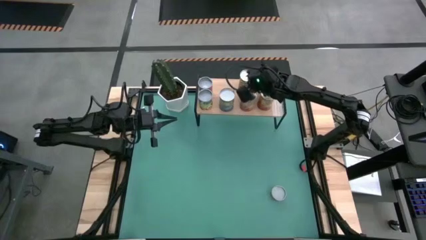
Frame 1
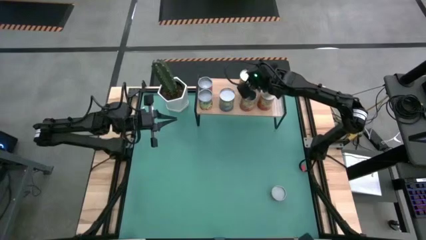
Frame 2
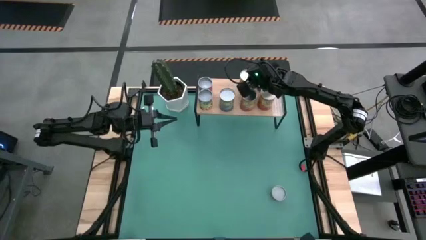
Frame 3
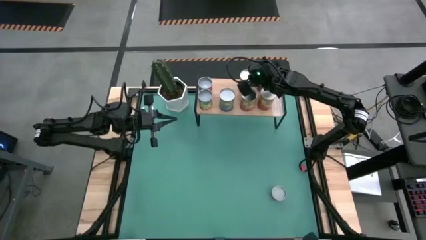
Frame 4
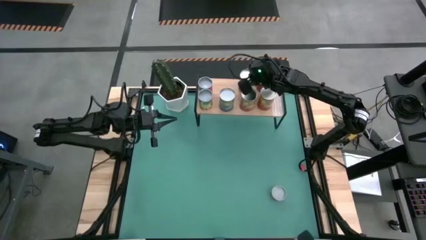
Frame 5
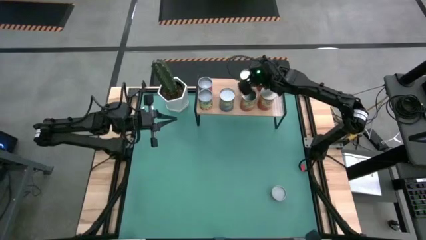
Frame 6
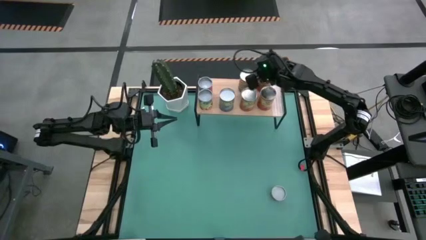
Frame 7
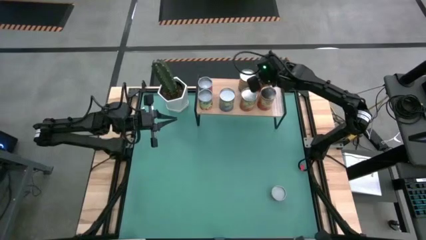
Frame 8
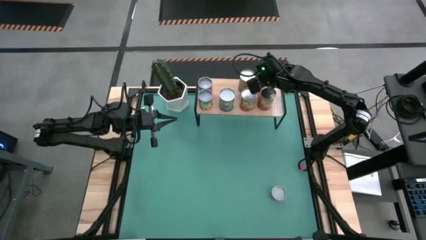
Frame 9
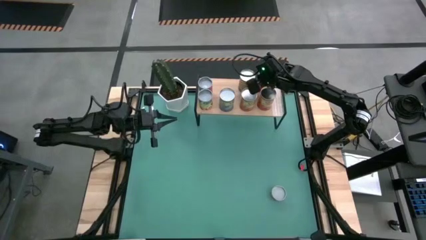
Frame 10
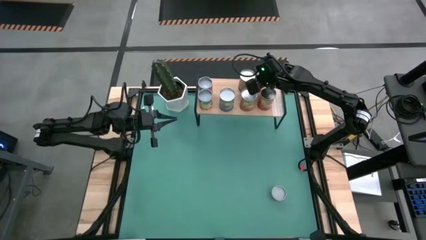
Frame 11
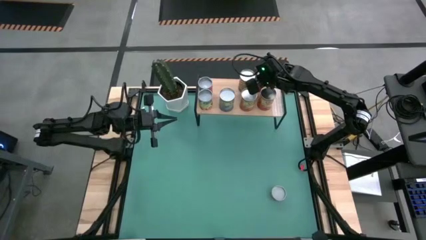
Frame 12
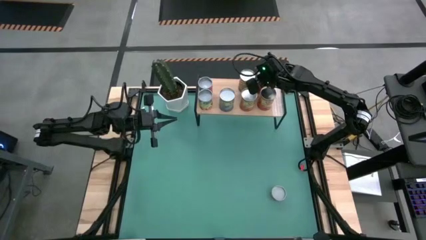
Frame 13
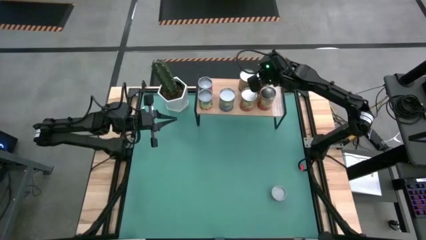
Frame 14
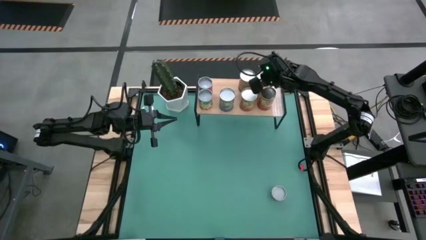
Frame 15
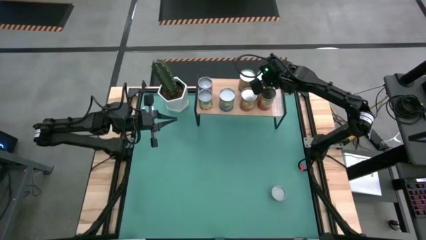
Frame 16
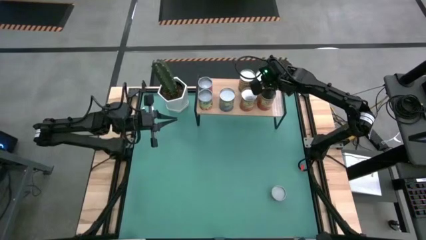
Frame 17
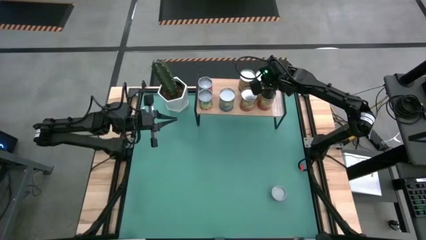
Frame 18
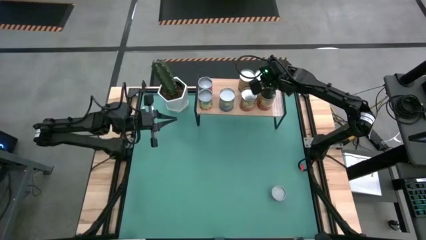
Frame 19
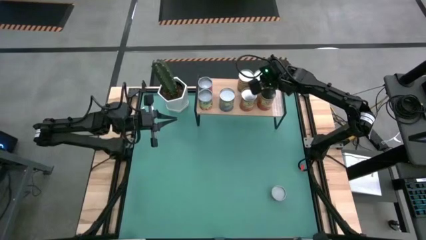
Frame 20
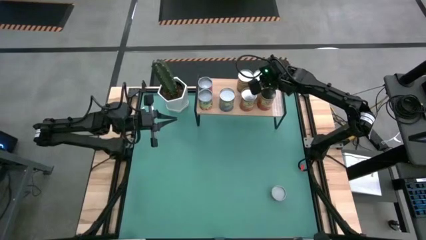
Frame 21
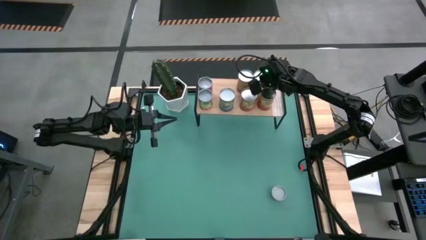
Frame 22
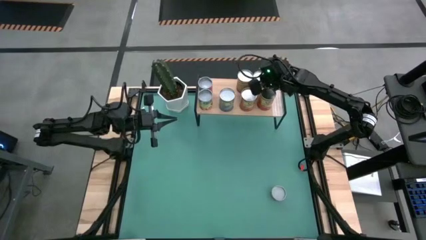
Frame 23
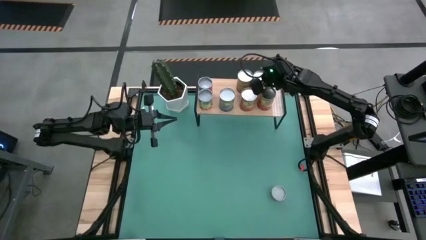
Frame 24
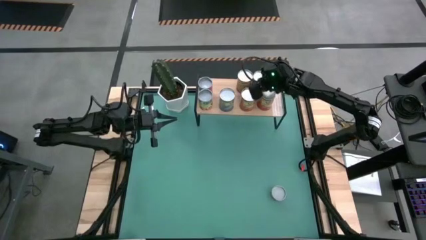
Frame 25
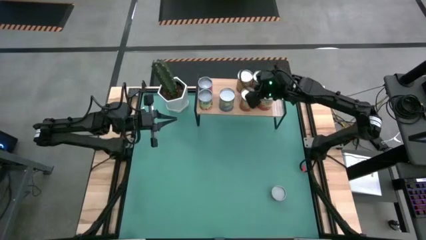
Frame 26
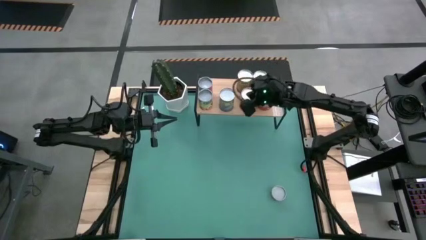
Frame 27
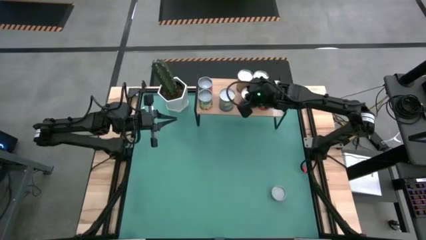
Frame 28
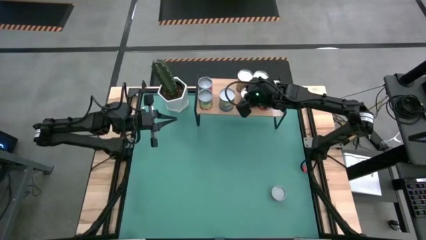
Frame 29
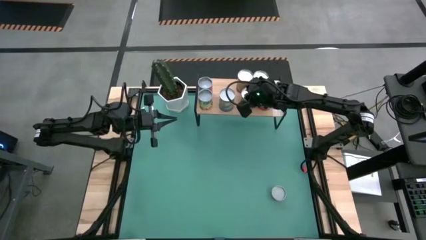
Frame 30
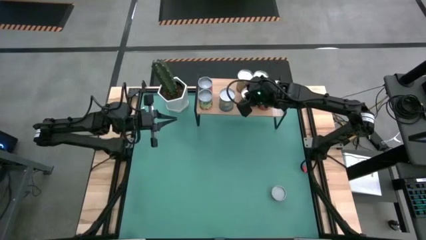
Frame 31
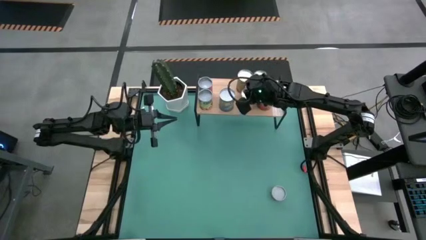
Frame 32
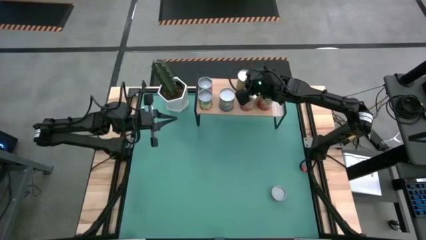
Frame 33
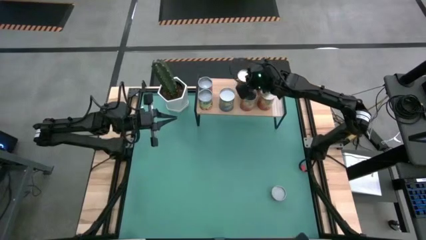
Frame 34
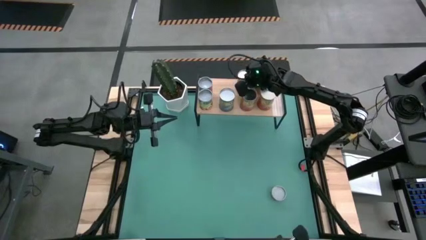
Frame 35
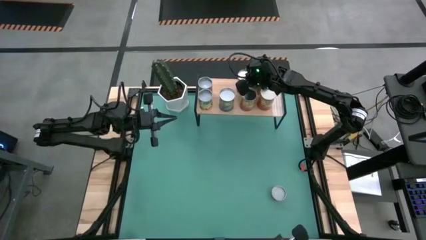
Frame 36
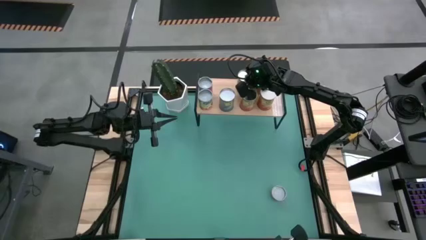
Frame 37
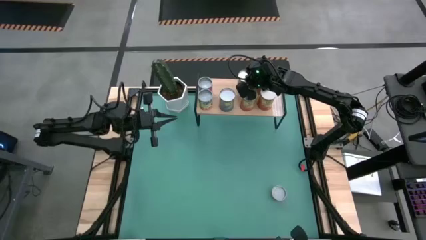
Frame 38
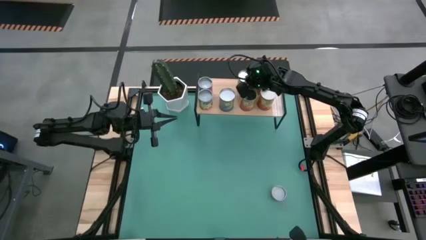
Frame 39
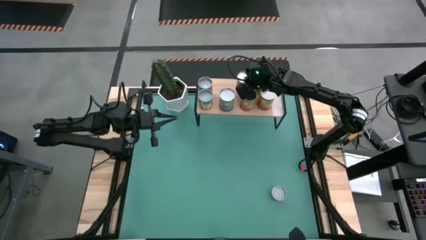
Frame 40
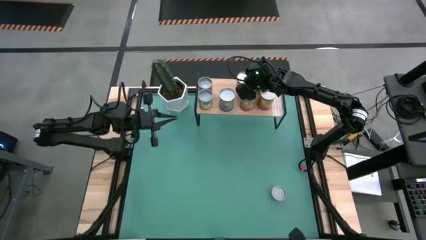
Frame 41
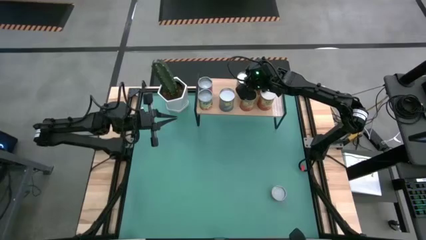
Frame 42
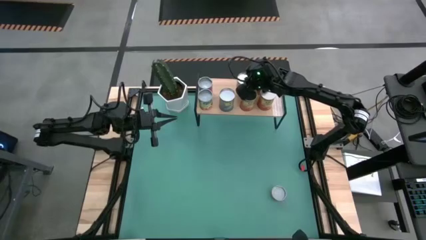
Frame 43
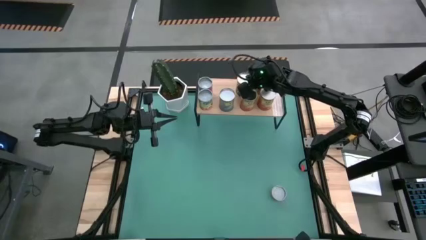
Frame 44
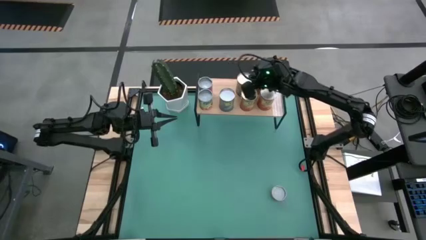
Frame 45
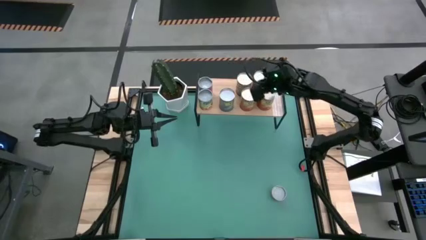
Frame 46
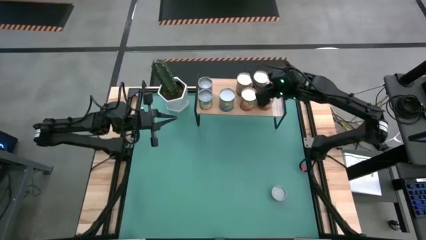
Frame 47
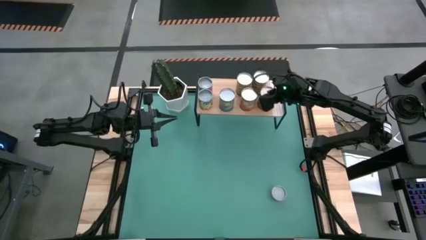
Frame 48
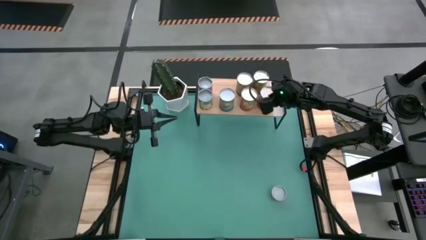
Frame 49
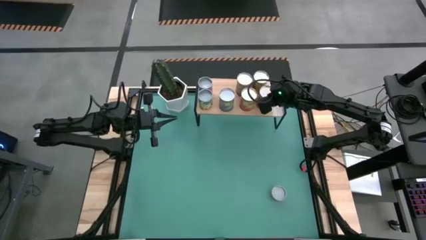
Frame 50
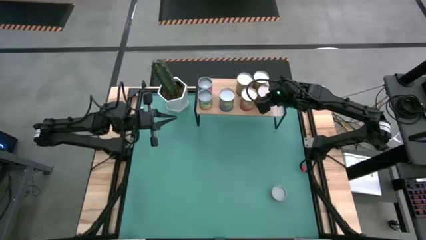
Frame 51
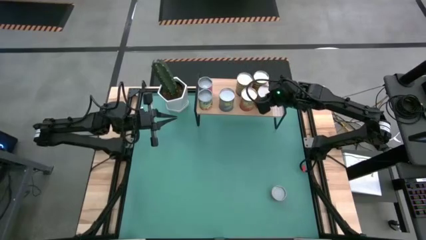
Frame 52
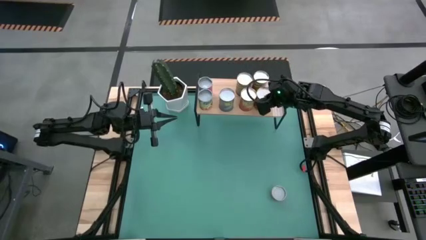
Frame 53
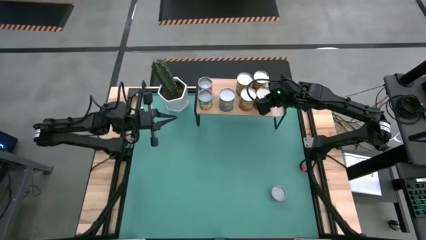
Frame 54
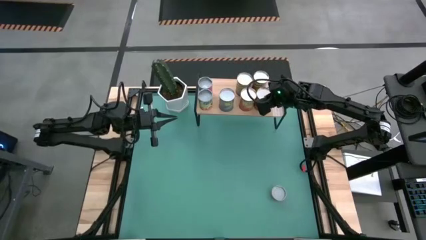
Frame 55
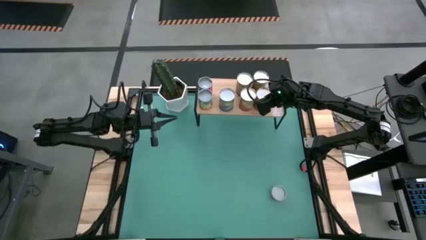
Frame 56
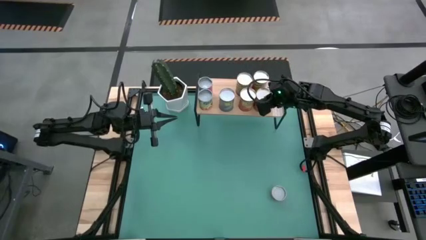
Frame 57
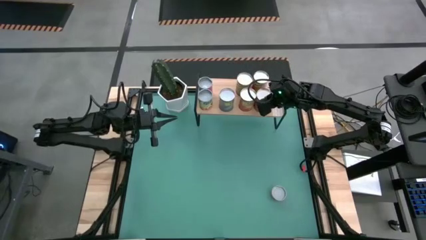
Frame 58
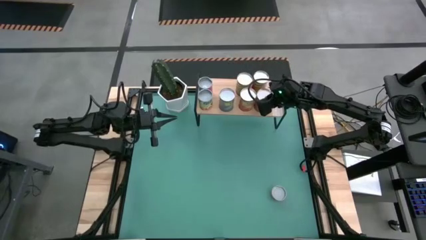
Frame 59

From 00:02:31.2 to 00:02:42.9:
Task: Pick and place cans onto a shelf
Adjust the cans on the shelf

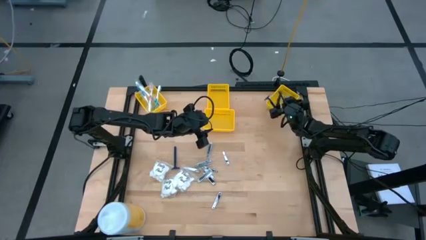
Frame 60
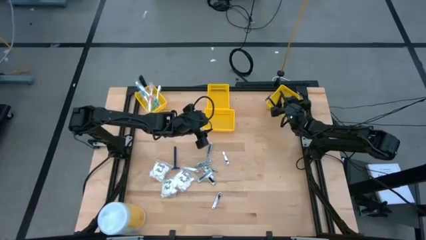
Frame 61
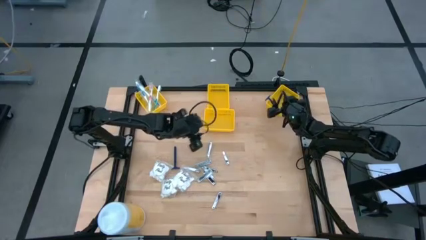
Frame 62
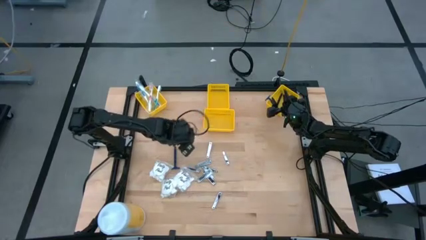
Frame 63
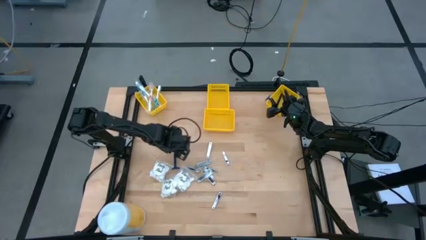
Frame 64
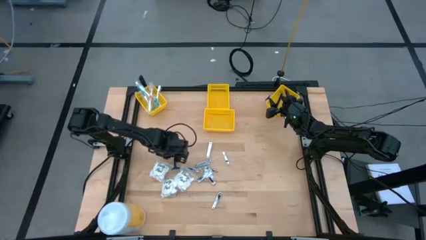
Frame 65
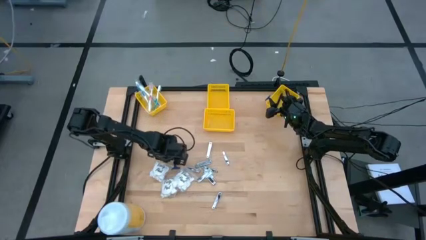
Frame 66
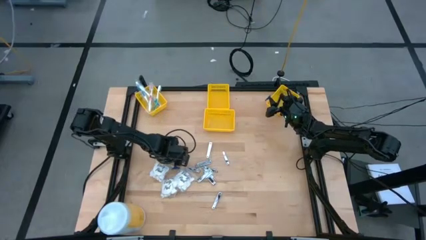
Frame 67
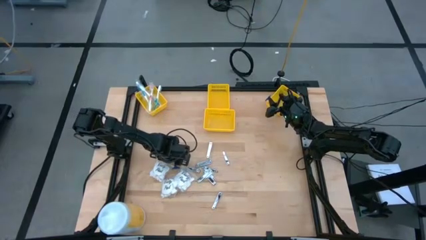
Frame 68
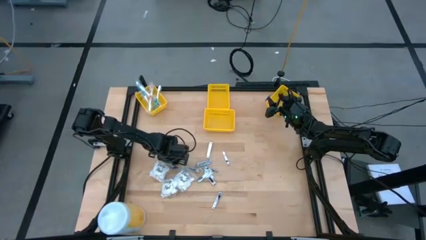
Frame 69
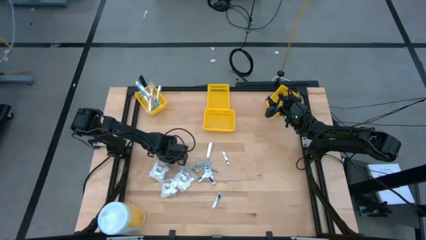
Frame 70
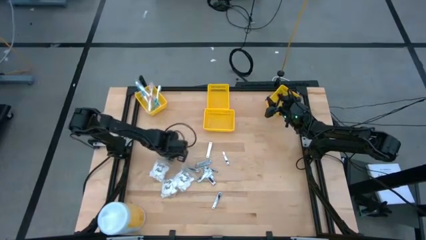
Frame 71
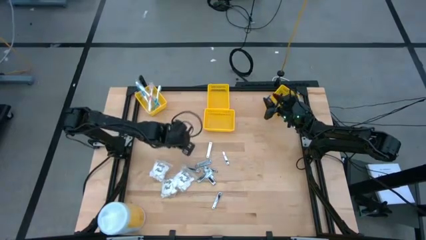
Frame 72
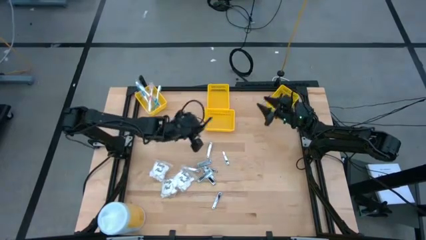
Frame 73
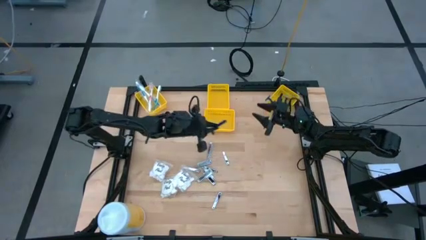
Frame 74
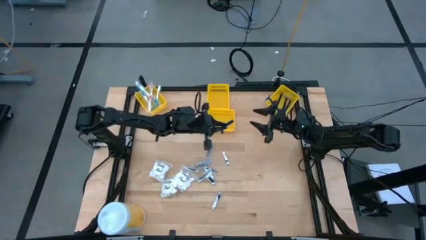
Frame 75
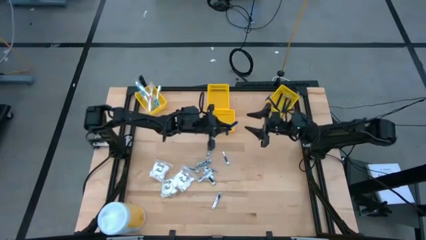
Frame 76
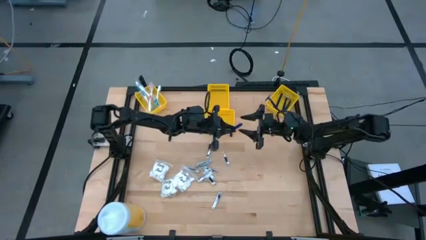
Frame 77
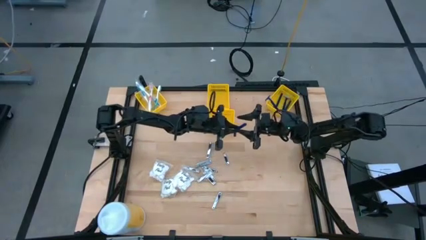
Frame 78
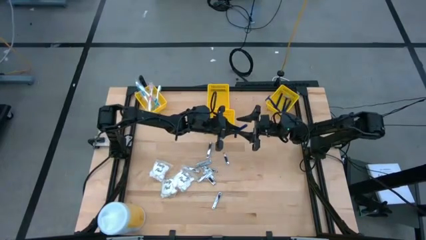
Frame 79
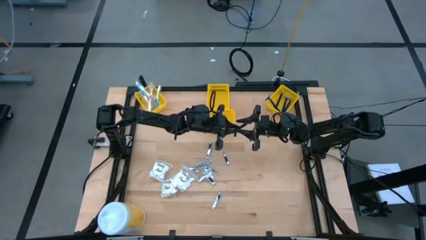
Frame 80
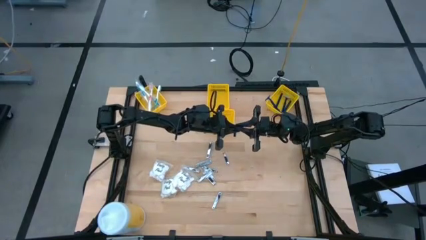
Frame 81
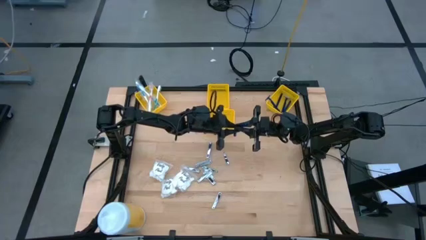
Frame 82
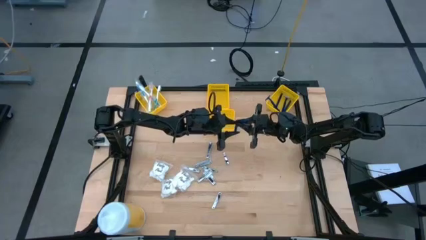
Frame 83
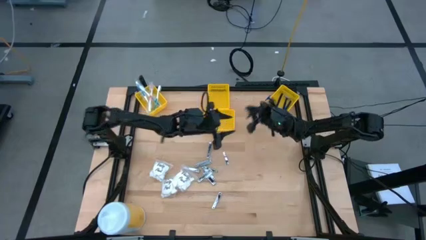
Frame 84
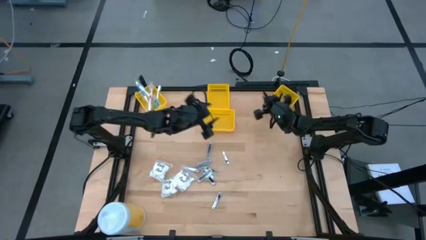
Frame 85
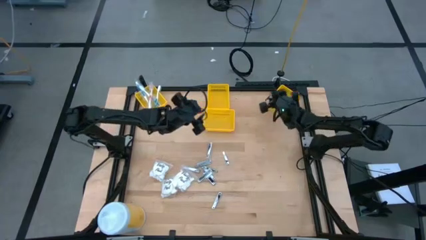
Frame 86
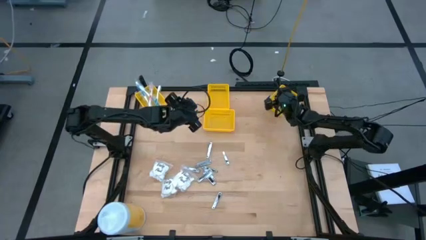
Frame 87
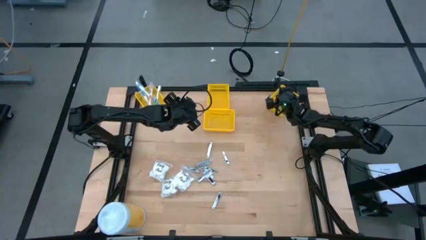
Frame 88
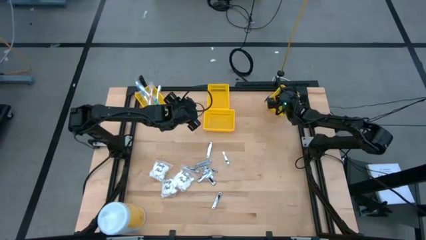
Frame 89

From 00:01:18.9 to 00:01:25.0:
Task: Pick & Place Travel size toiletries
Put the blue razor into the right yellow bin
